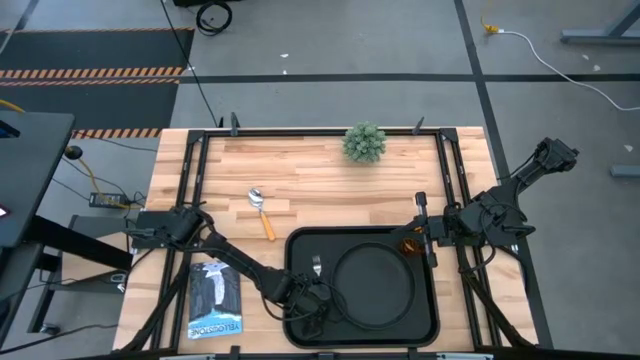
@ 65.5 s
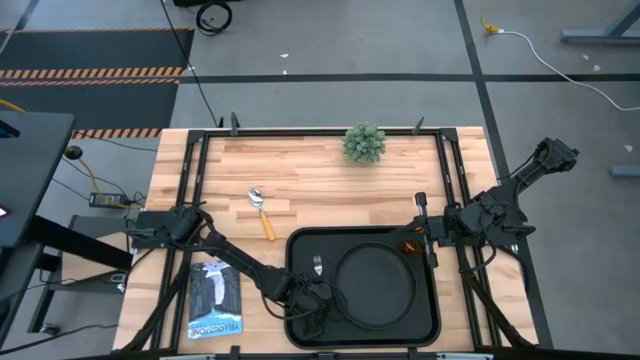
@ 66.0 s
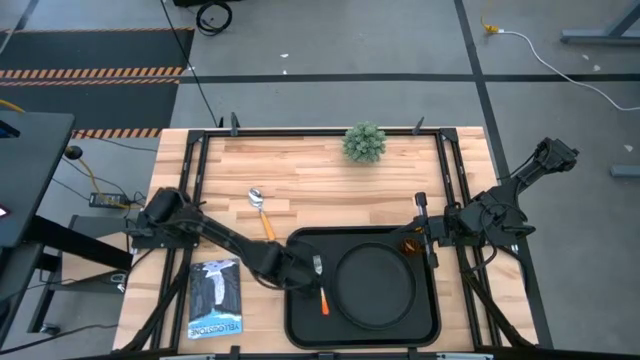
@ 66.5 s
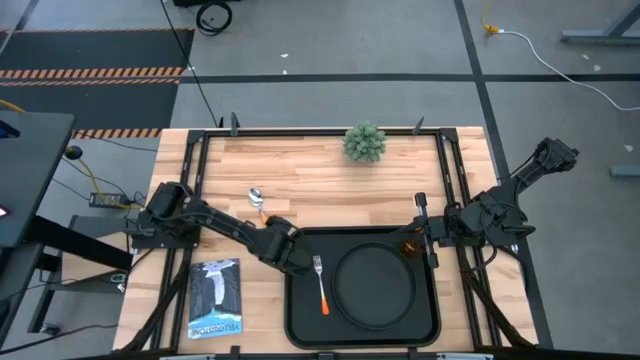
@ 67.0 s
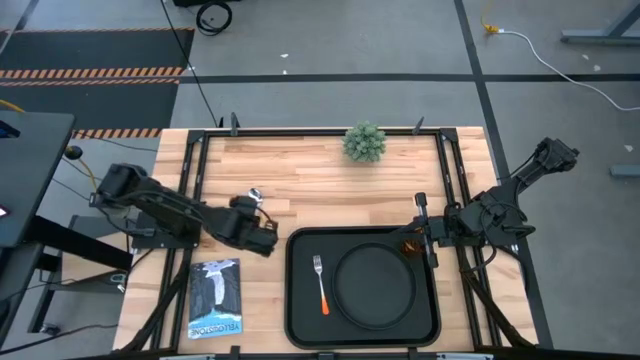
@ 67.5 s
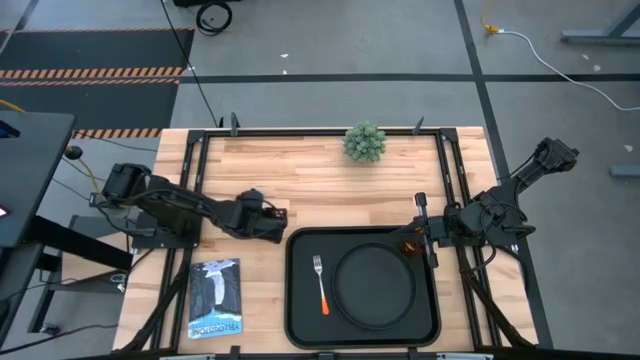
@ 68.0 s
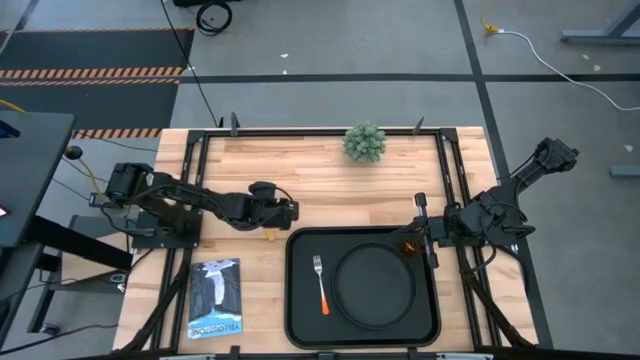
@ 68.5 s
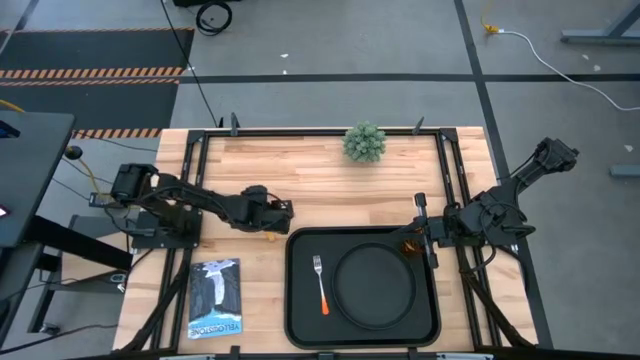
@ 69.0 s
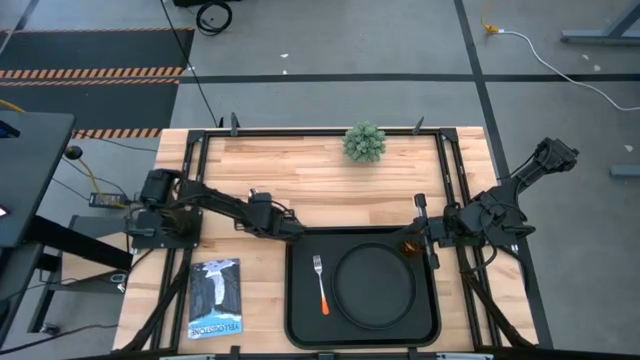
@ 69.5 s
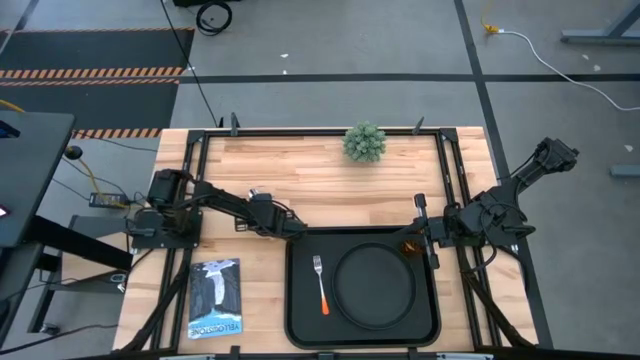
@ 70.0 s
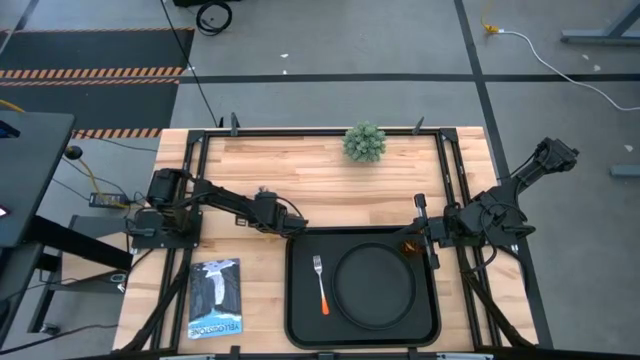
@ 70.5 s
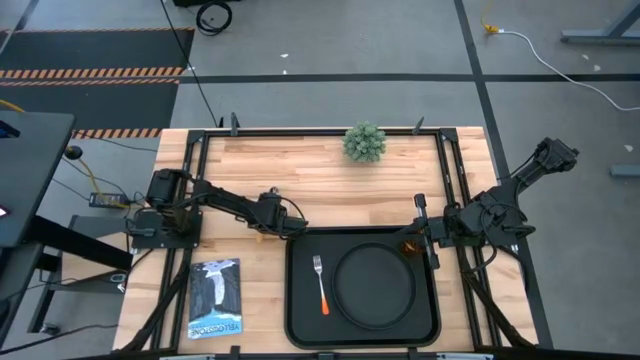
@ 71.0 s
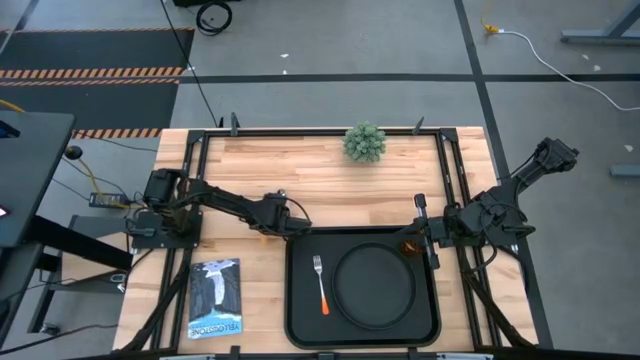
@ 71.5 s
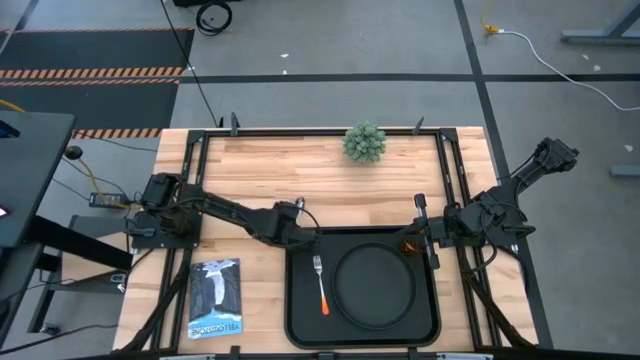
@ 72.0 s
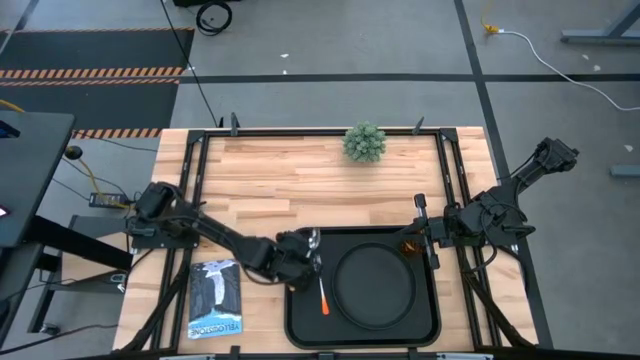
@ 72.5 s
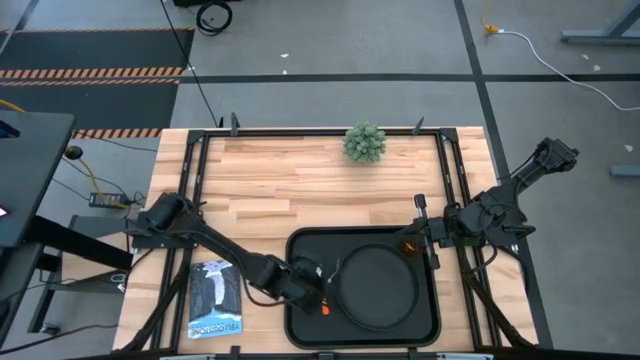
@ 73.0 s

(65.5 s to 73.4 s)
Task: Pick and place plate/cup/fork/spoon on tray
Put the yellow spoon to the left orange fork on the black tray

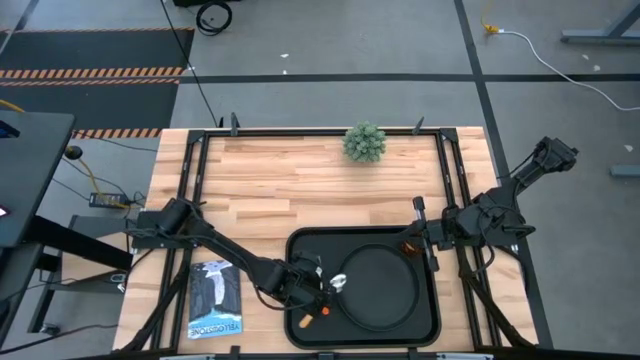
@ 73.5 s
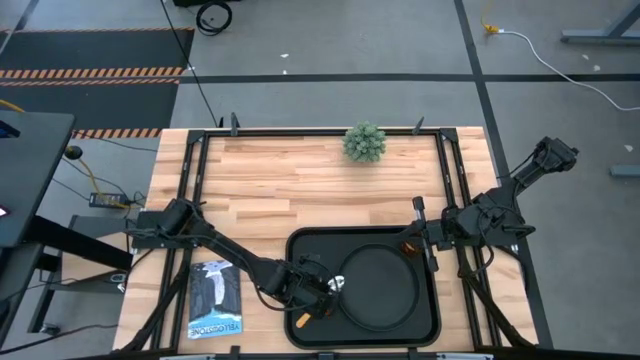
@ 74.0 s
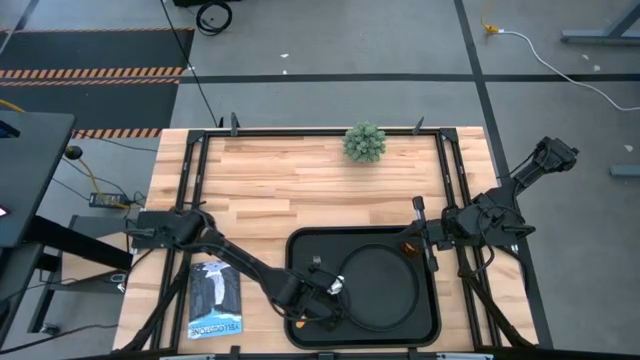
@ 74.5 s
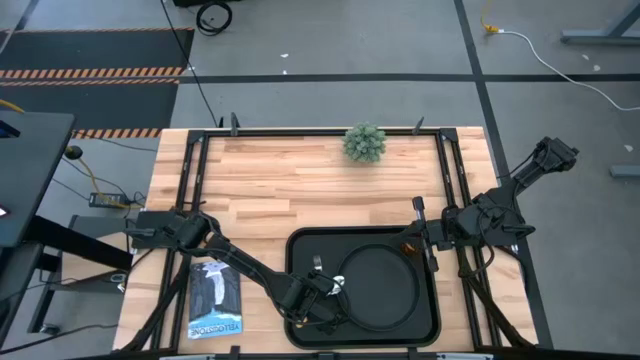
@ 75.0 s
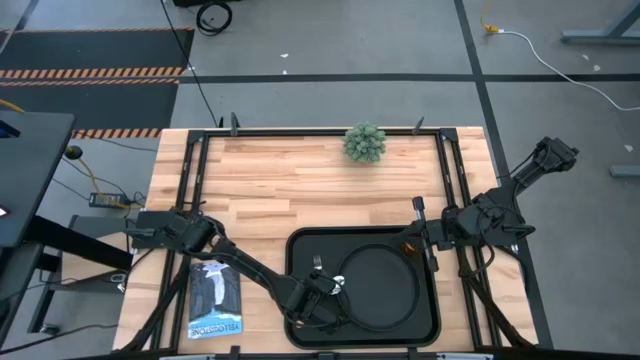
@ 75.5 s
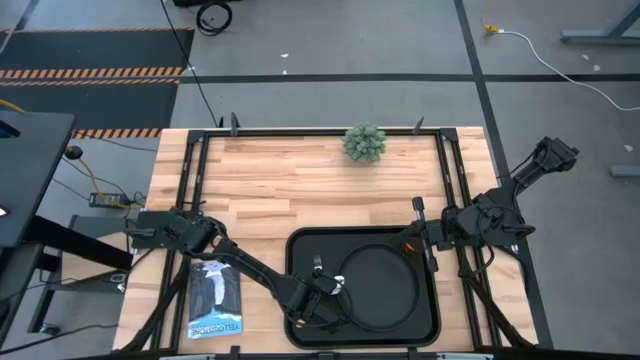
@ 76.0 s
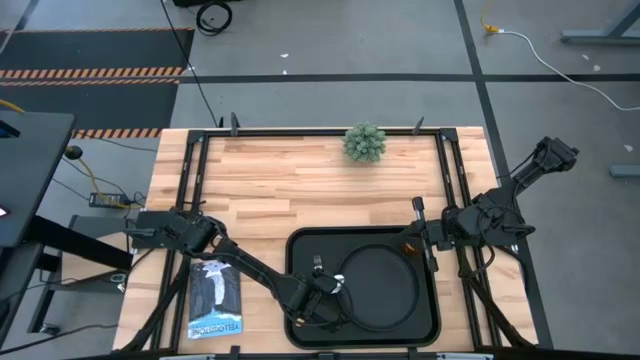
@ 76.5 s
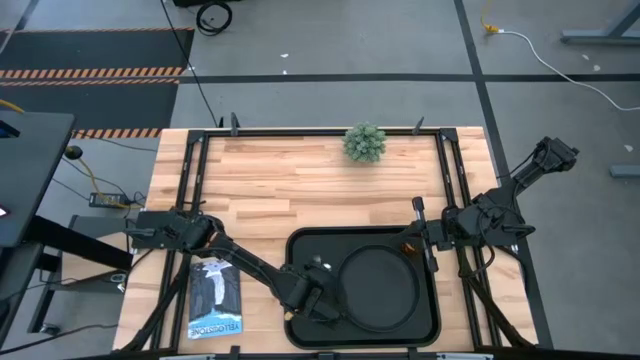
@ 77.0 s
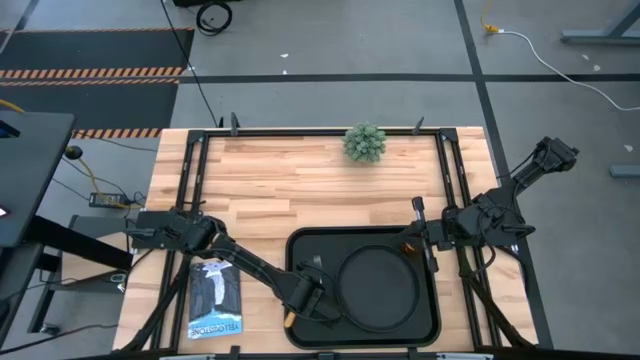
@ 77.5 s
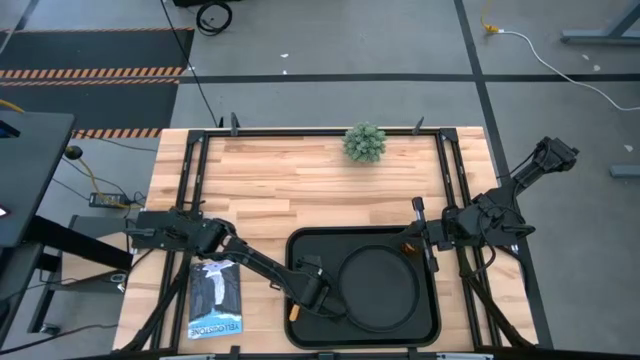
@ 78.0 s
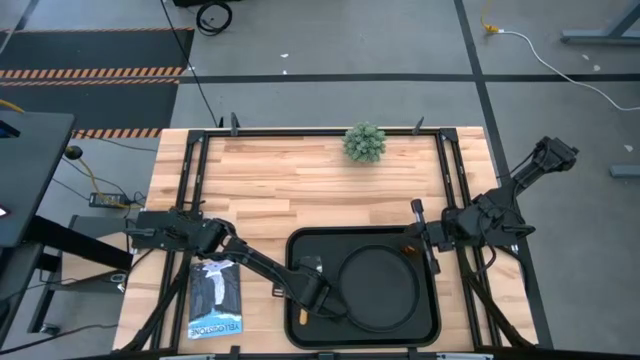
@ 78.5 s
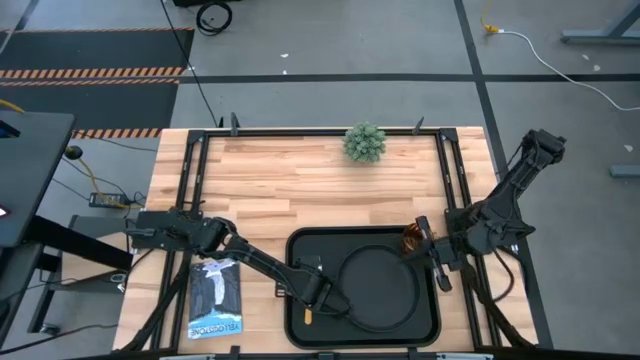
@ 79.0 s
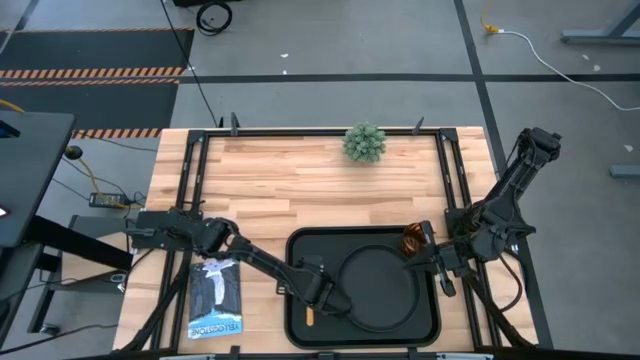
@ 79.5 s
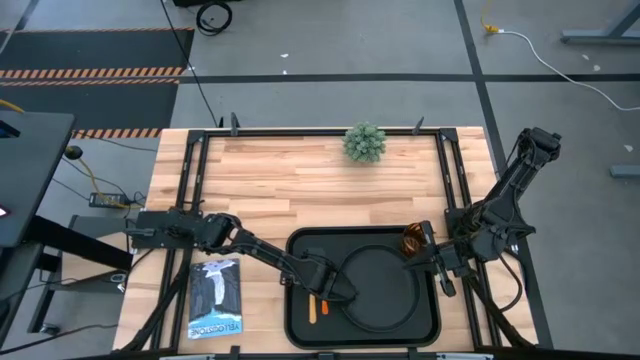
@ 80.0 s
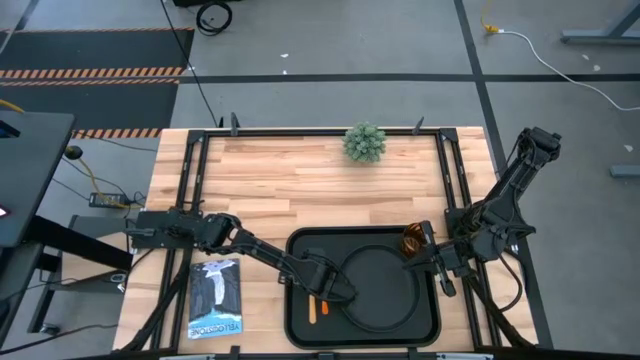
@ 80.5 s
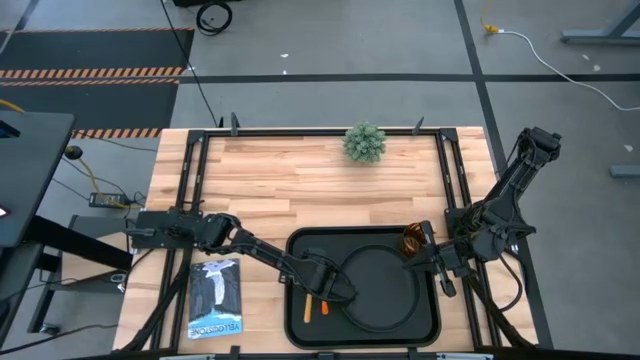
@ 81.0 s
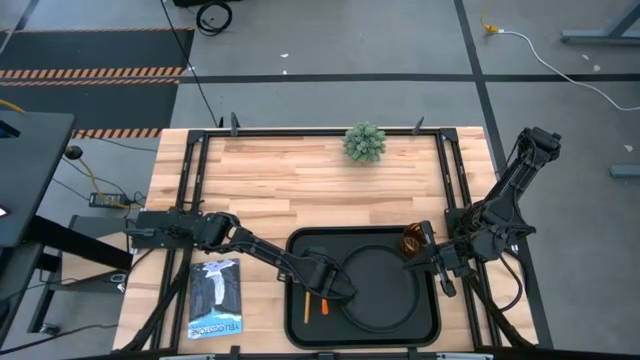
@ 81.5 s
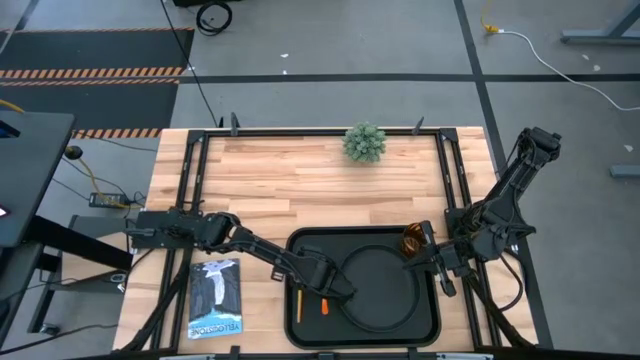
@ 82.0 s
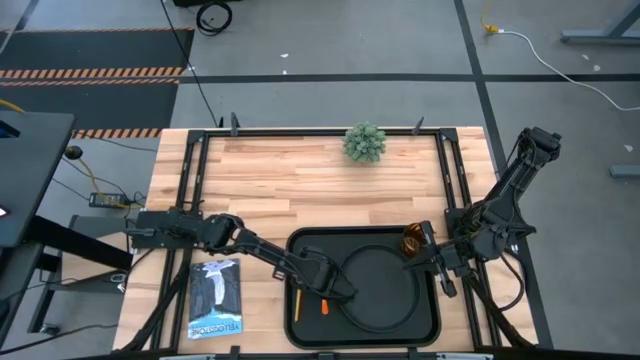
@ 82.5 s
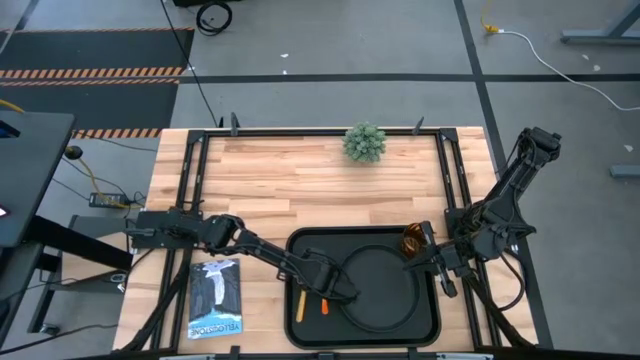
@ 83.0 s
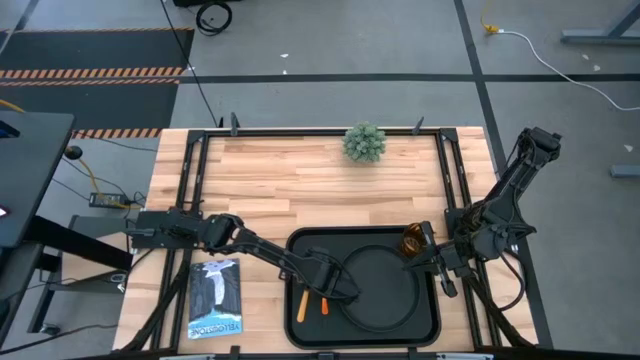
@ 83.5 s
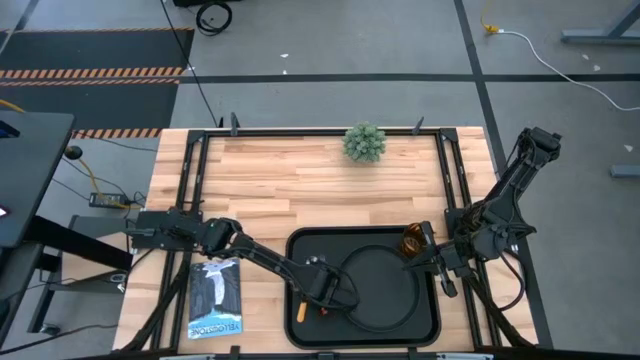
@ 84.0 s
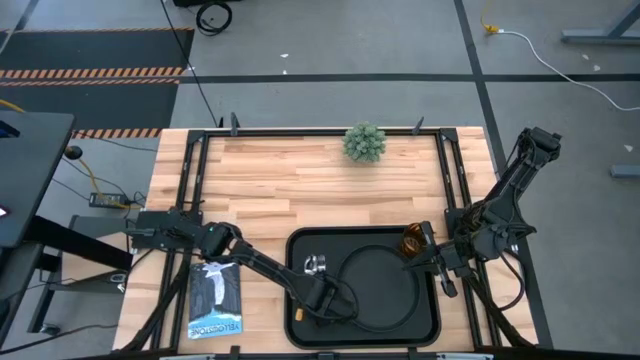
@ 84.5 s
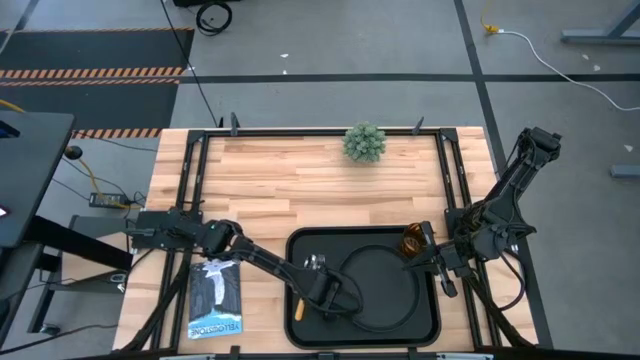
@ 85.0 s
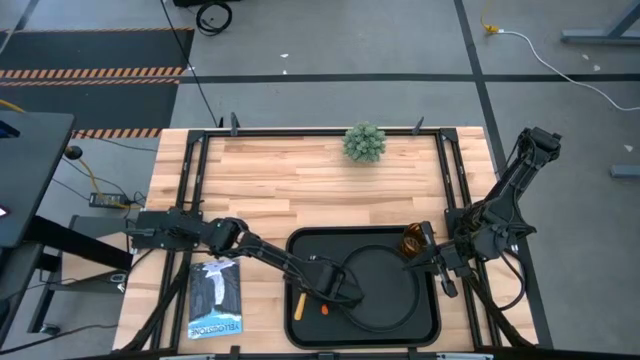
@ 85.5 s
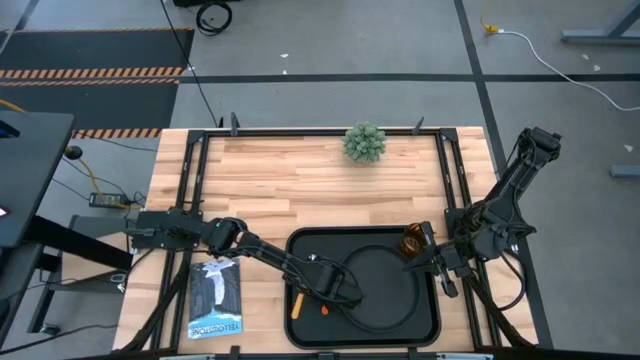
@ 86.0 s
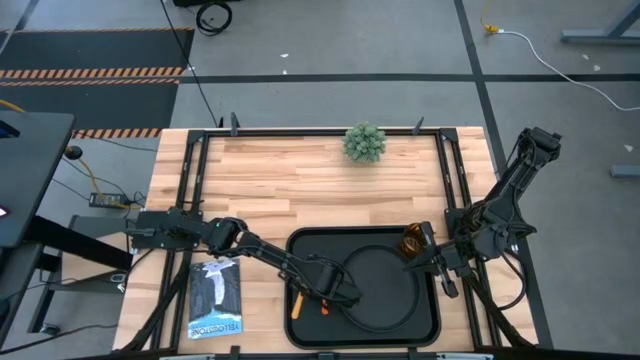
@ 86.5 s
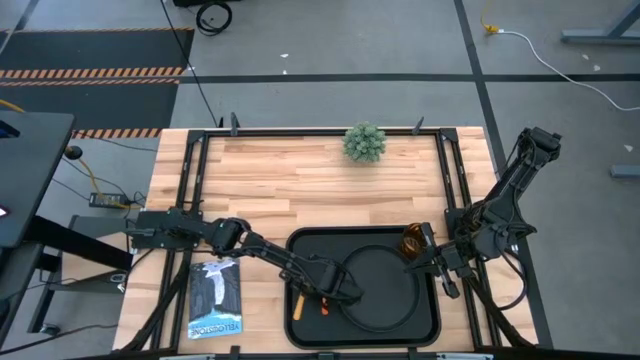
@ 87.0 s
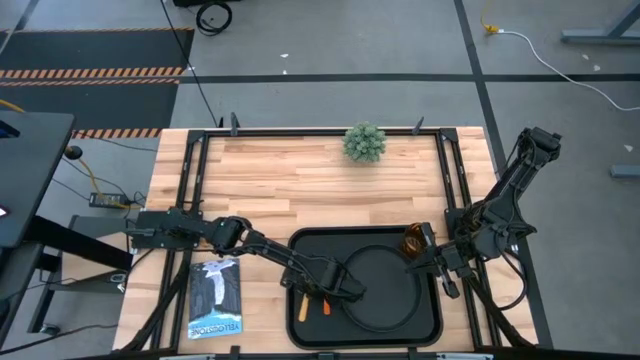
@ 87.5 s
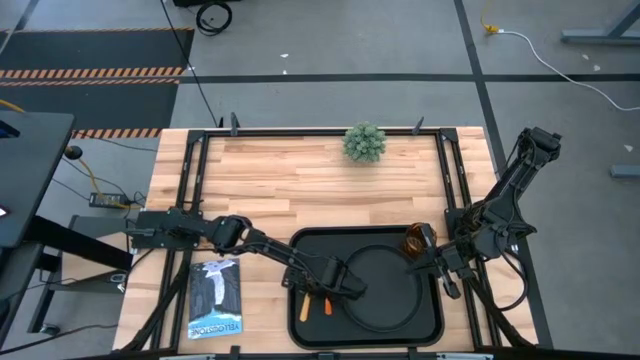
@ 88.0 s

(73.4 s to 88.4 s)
Put the yellow spoon to the left orange fork on the black tray
